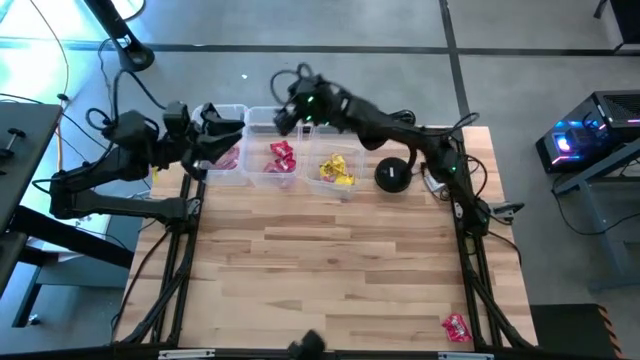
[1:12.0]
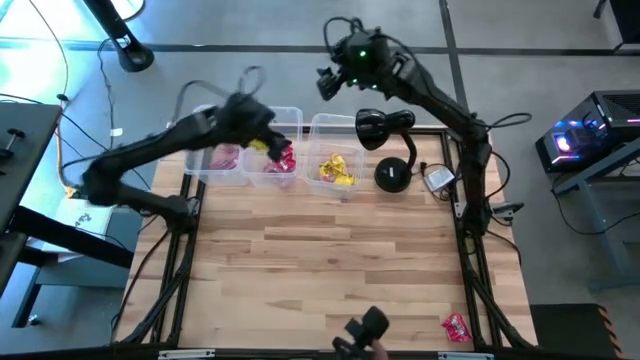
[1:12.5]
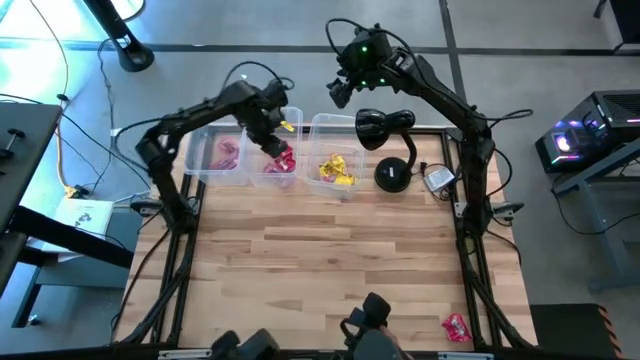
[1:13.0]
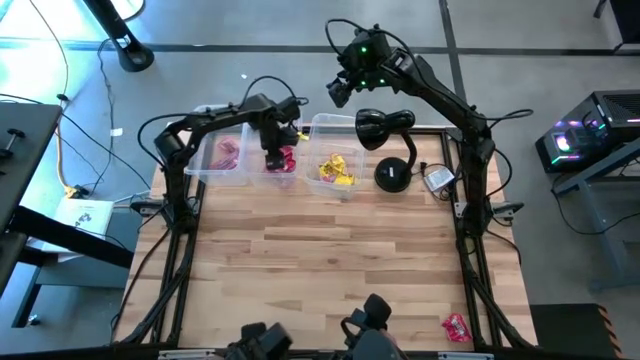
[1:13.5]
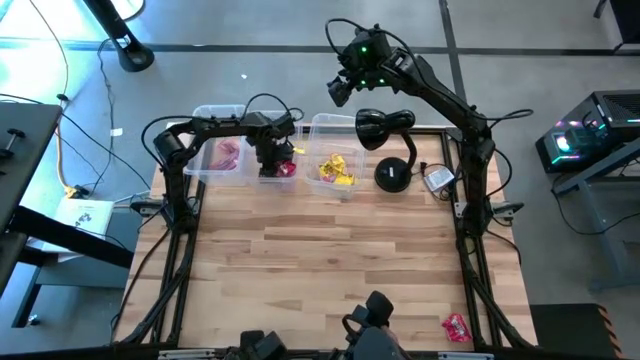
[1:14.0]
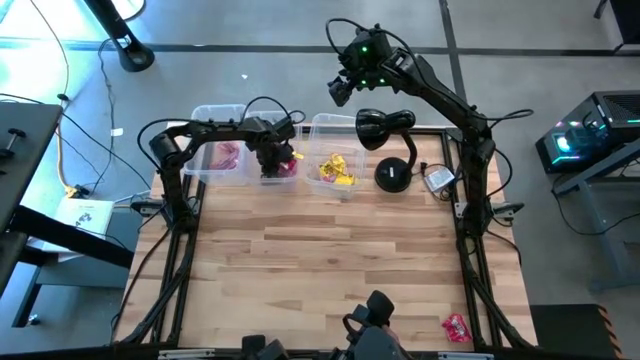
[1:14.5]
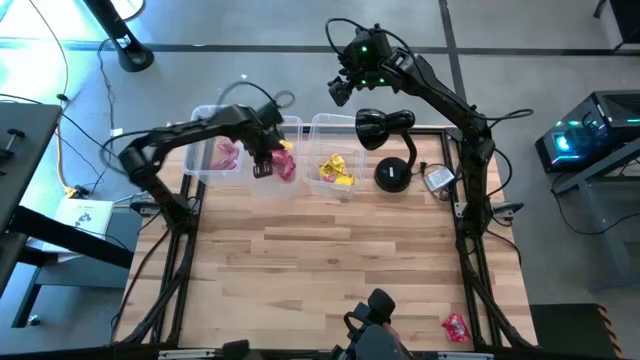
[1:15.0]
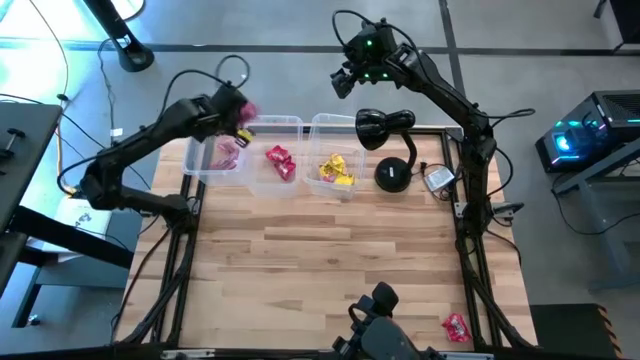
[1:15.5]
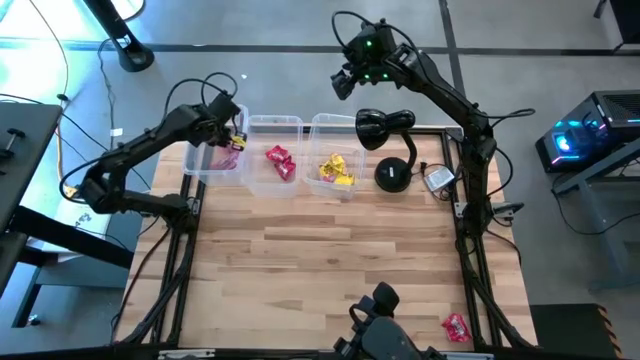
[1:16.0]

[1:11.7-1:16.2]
Task: Sort candy
Put the pink candy wrapper into the left transparent bin

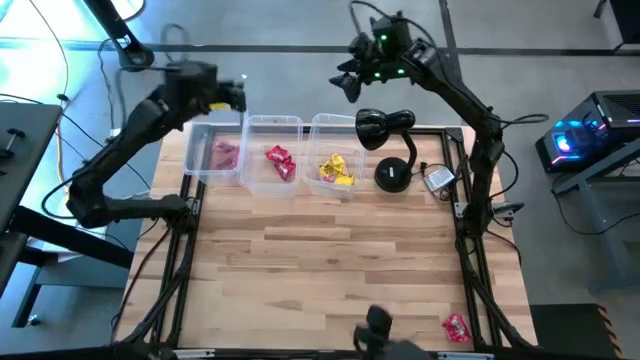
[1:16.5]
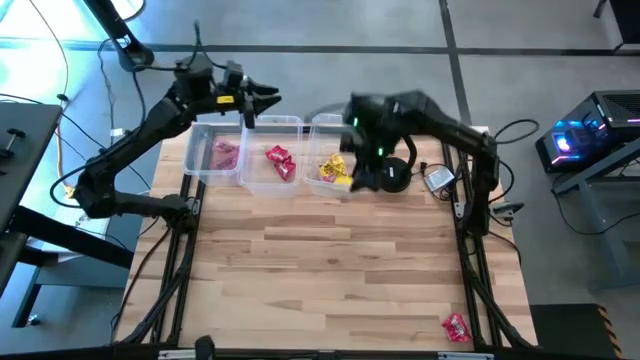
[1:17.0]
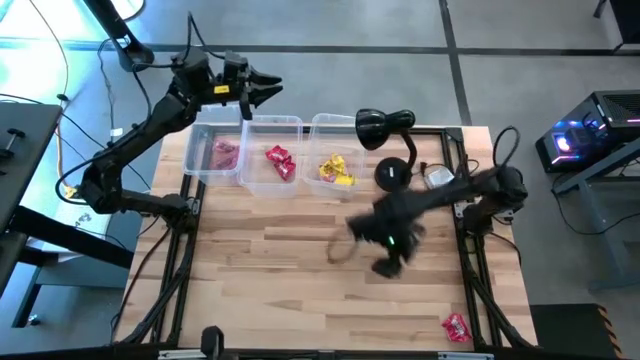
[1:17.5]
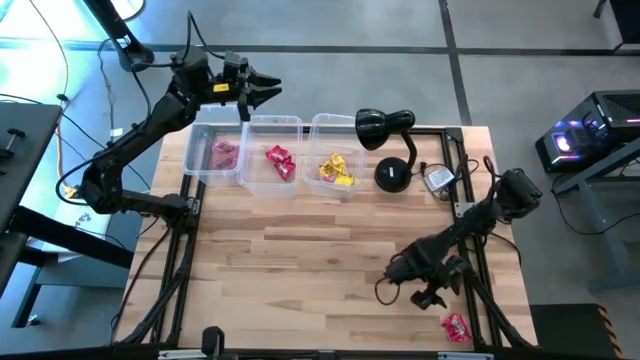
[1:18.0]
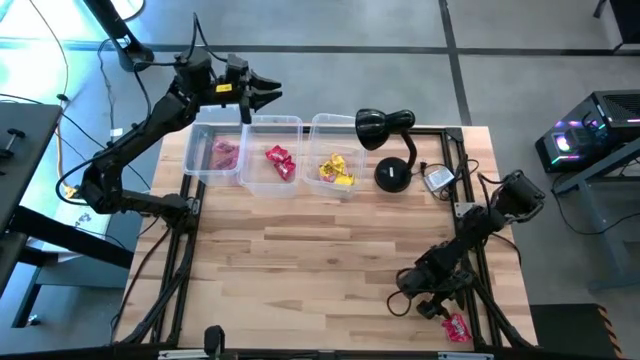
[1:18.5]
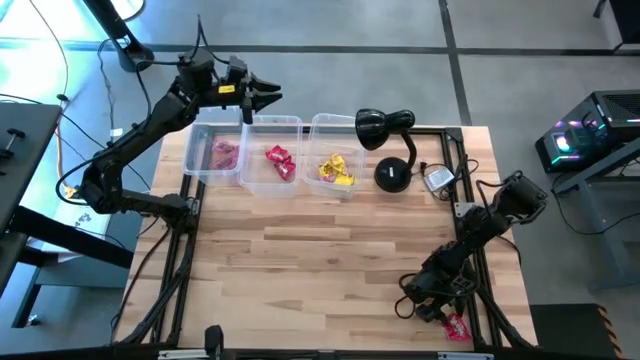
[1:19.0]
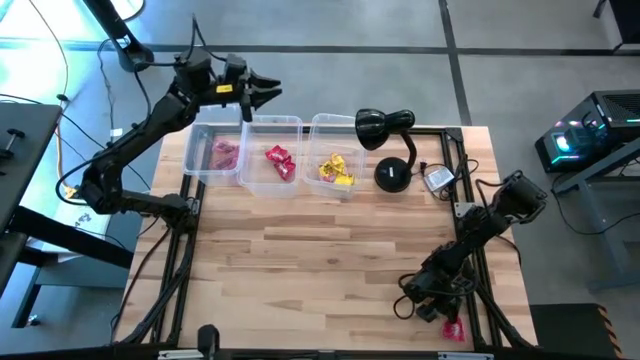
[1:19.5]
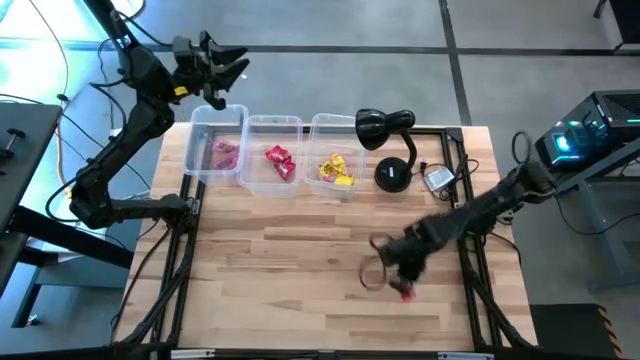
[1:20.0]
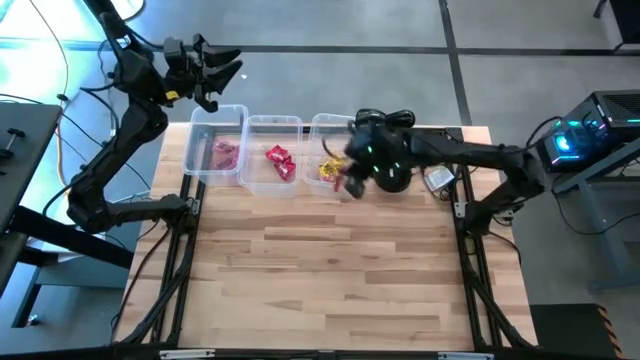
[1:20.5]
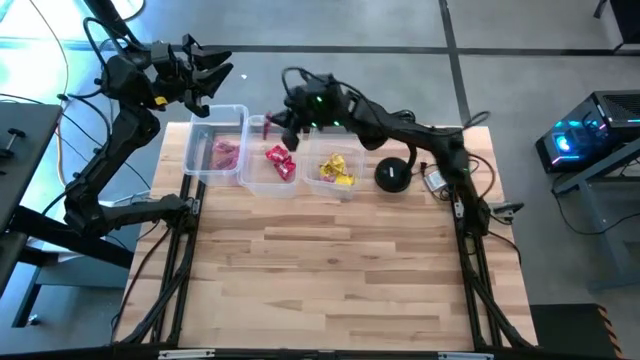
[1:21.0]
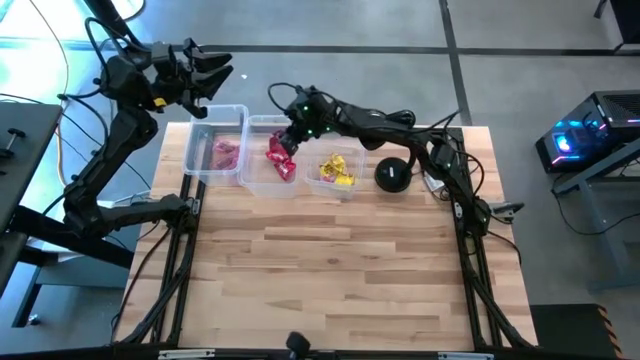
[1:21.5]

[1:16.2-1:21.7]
Put the red candy wrapper into the middle transparent bin

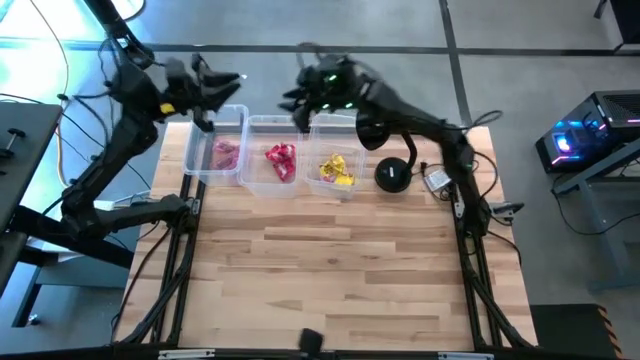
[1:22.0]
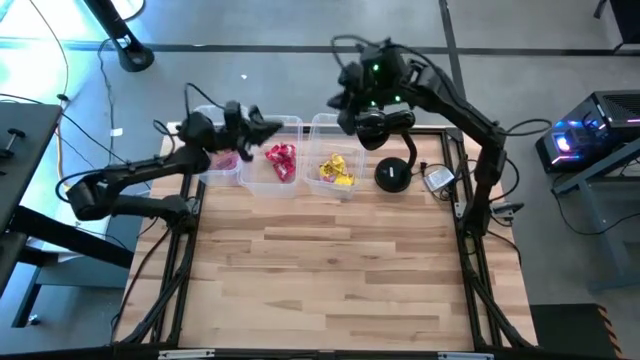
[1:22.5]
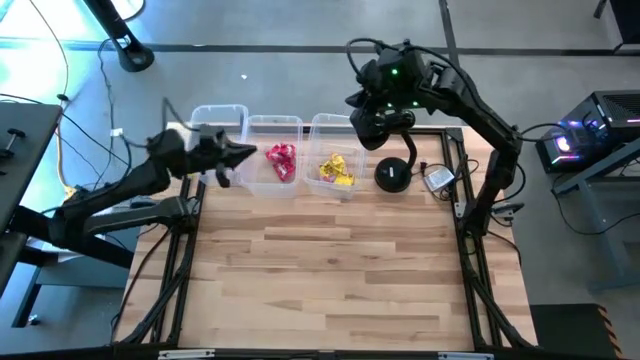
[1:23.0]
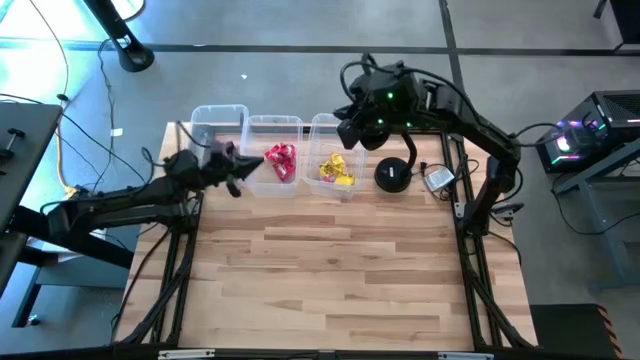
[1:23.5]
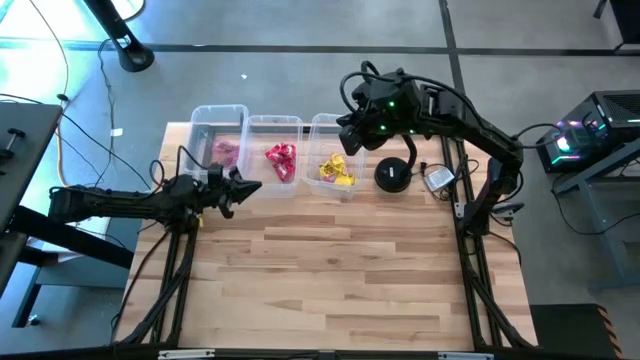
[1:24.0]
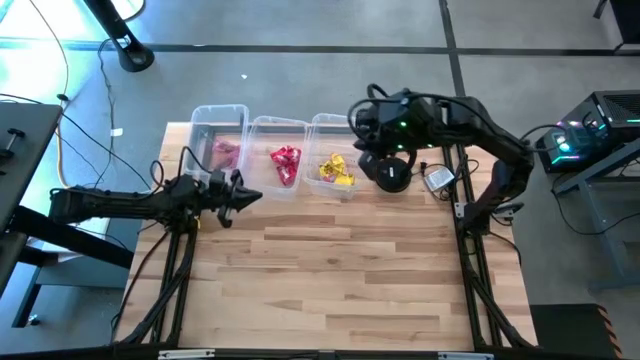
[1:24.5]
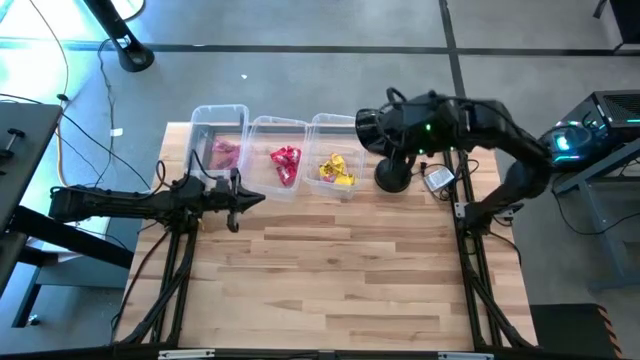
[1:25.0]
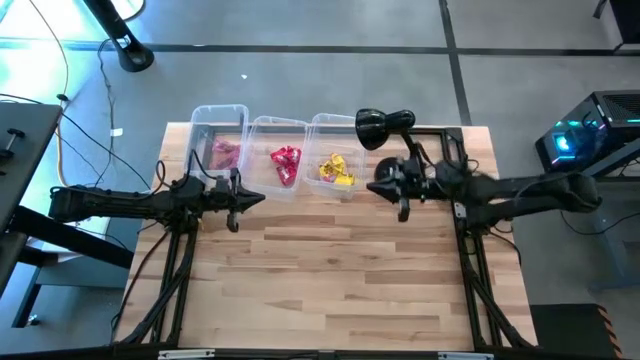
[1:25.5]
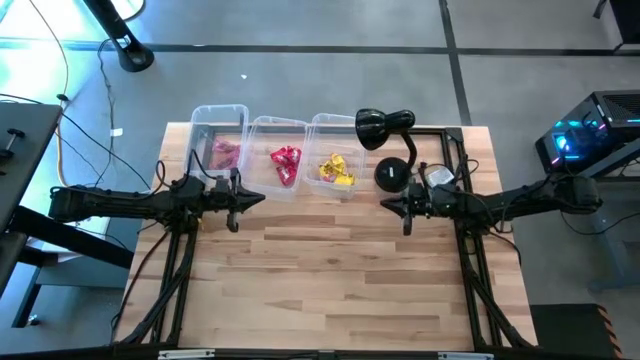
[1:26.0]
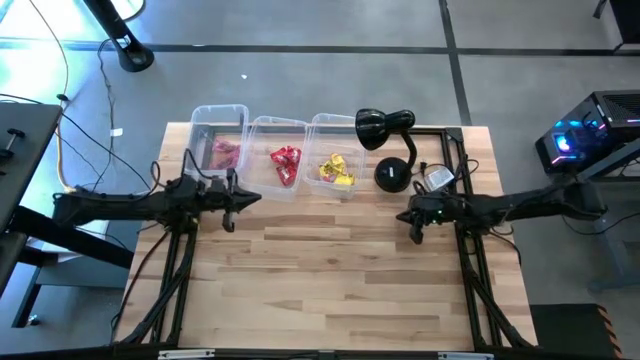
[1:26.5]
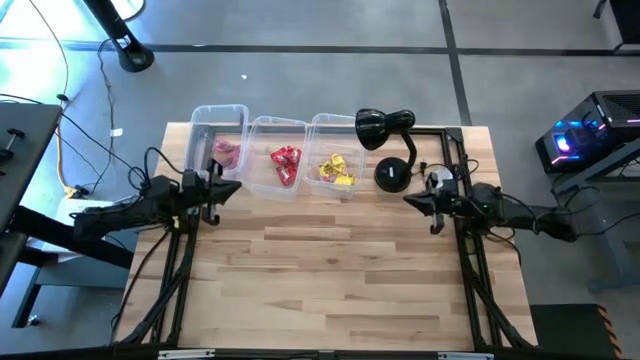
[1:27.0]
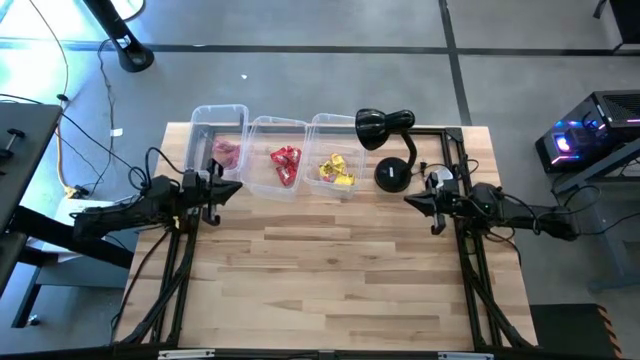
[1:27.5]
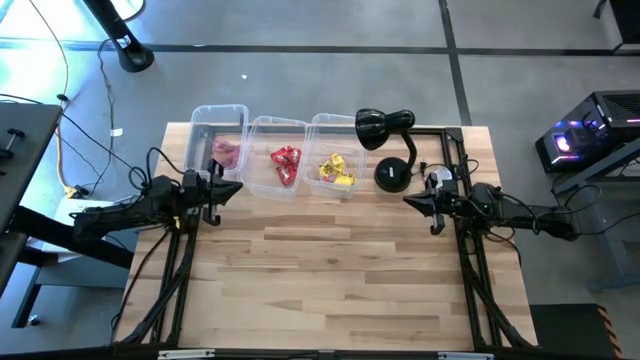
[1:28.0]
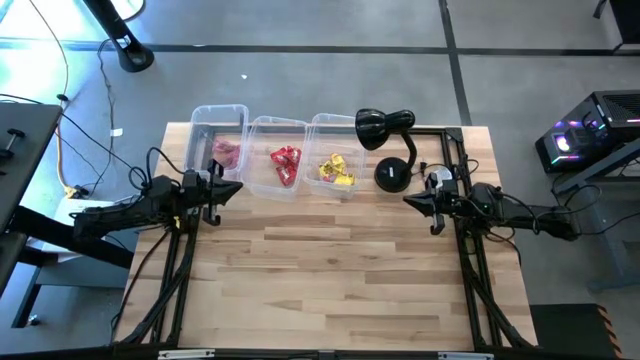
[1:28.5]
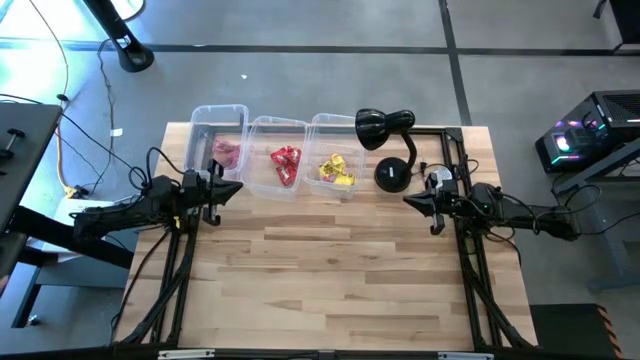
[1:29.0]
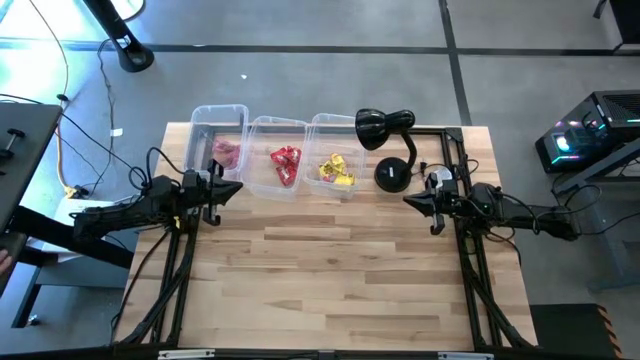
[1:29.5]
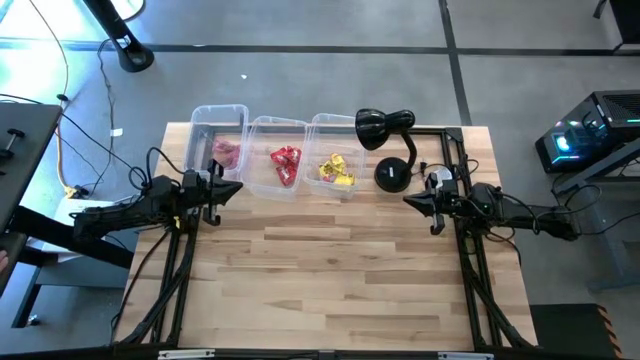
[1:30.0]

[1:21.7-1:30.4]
Return to Home Position

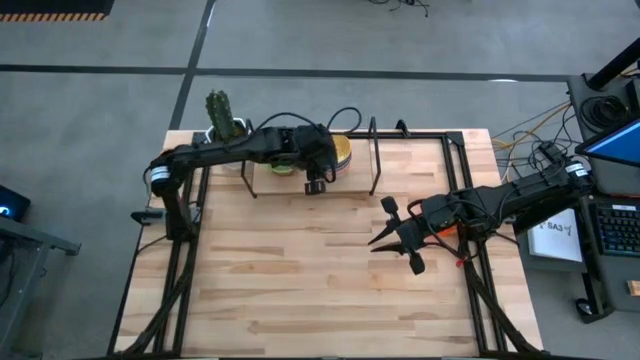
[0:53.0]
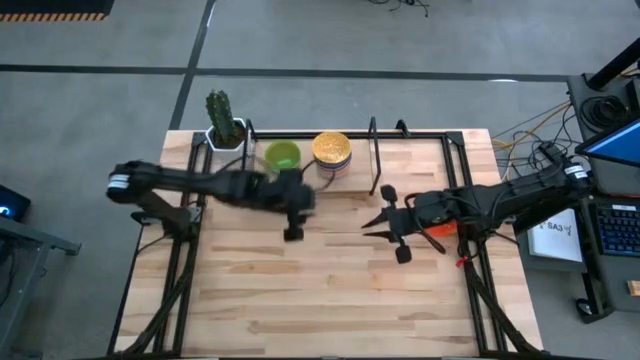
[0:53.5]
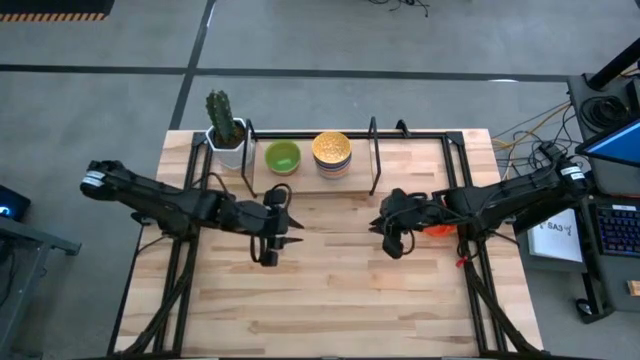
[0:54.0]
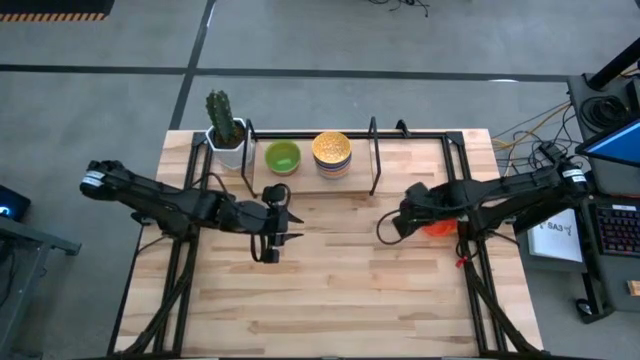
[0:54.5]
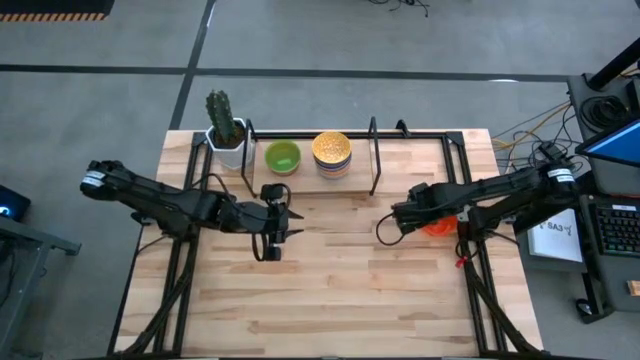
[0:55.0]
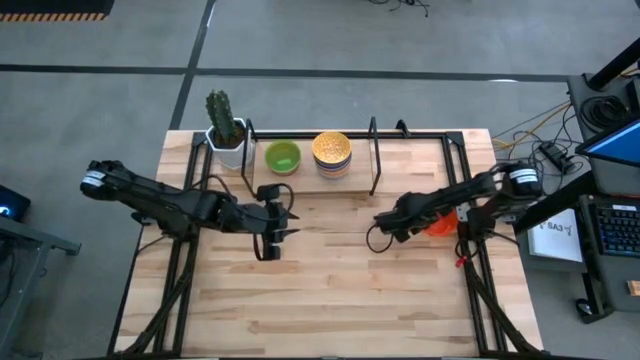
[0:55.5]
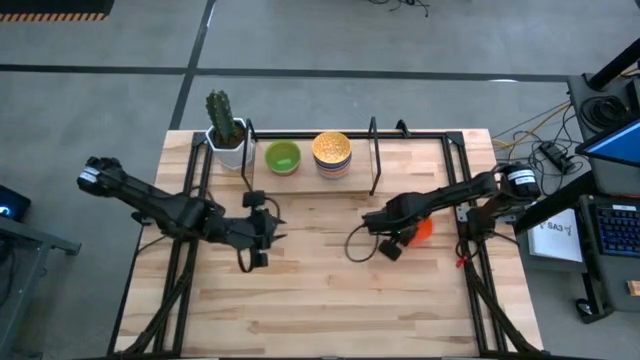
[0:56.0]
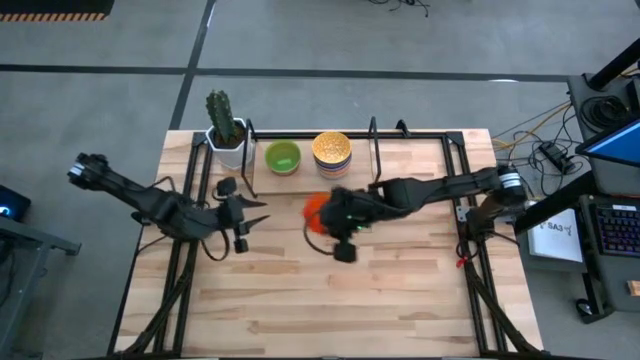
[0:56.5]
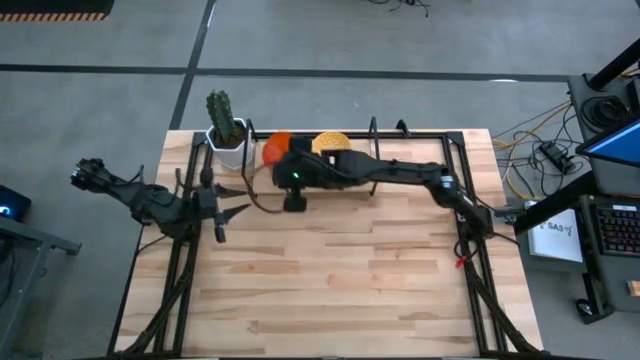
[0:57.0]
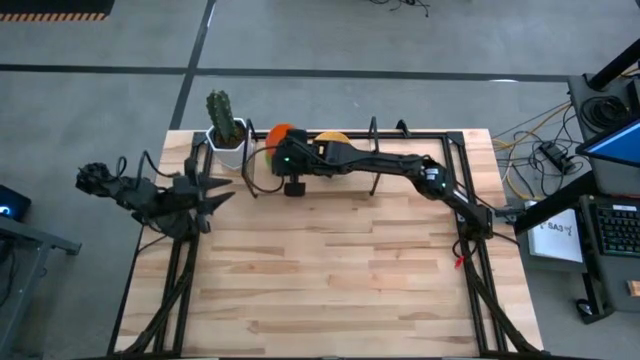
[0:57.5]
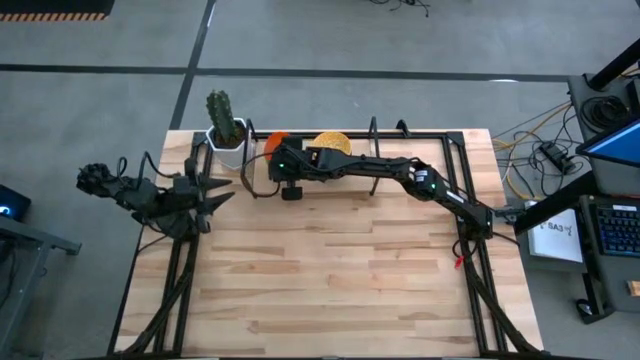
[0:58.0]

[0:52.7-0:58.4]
Task: Place and stack bowls onto a shelf
Stack the orange bowl on top of the green bowl on the shelf
